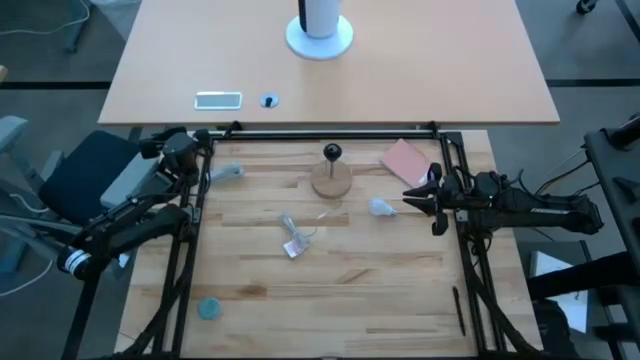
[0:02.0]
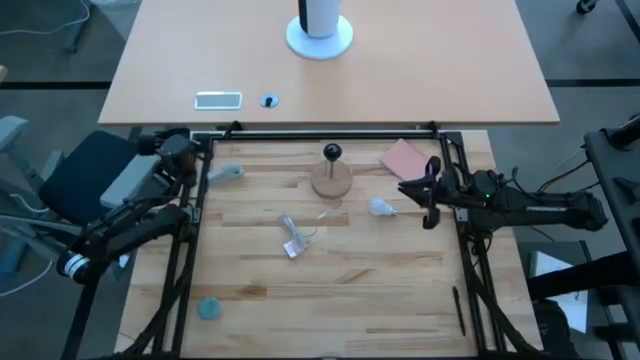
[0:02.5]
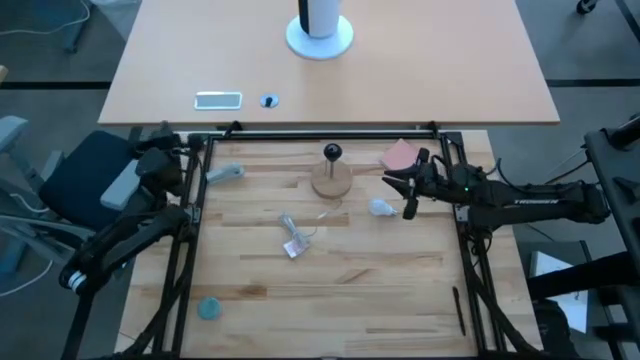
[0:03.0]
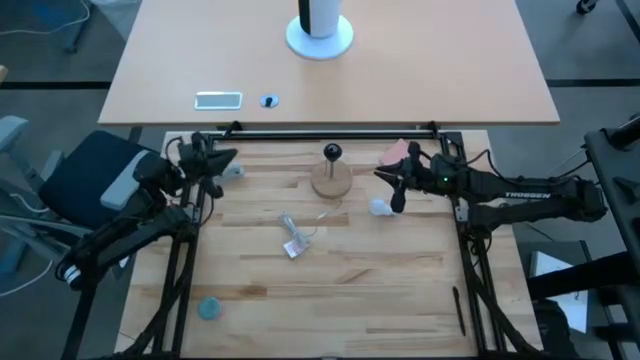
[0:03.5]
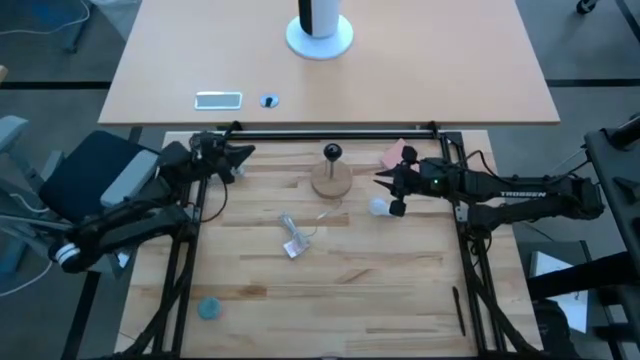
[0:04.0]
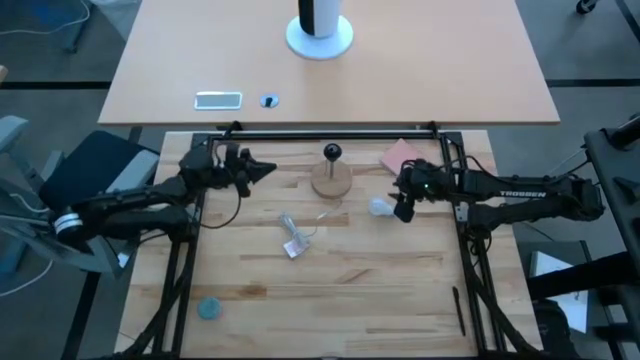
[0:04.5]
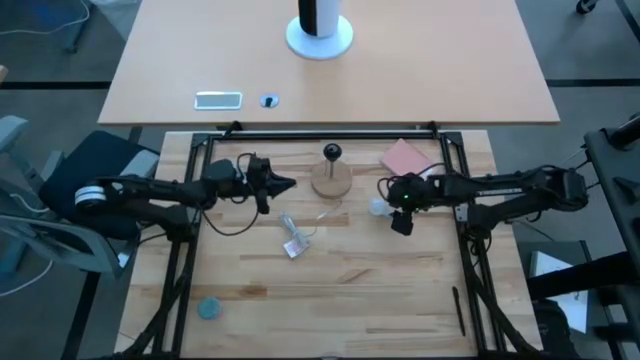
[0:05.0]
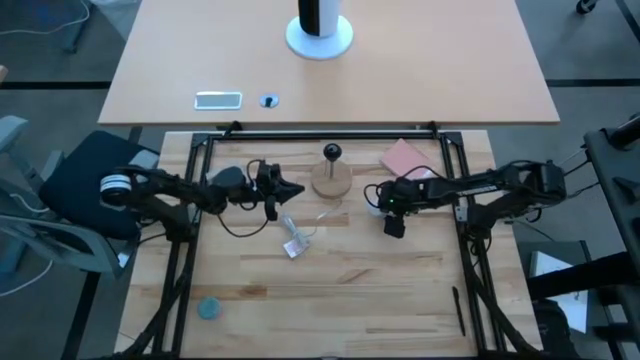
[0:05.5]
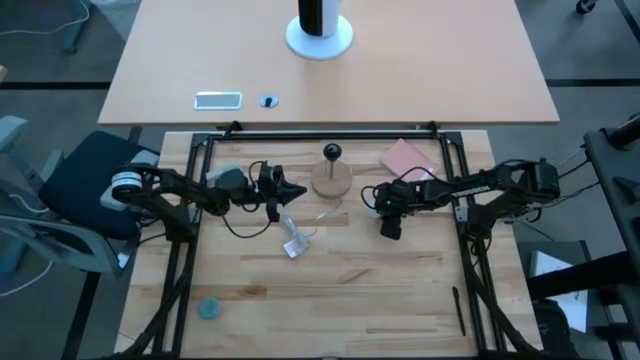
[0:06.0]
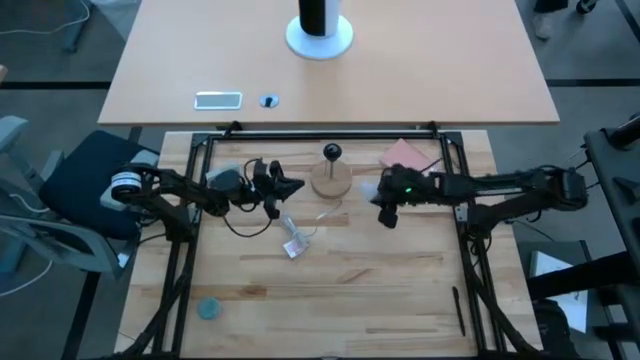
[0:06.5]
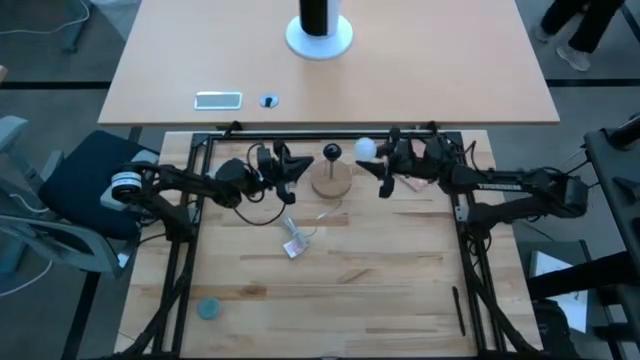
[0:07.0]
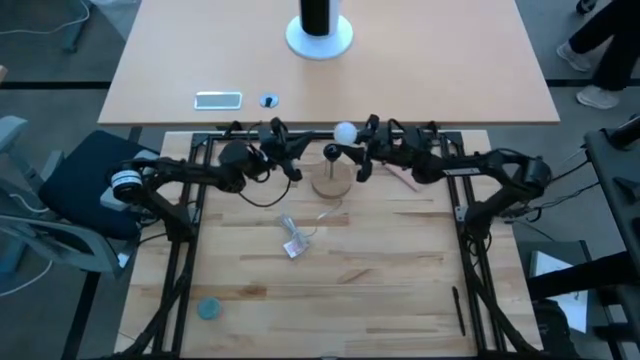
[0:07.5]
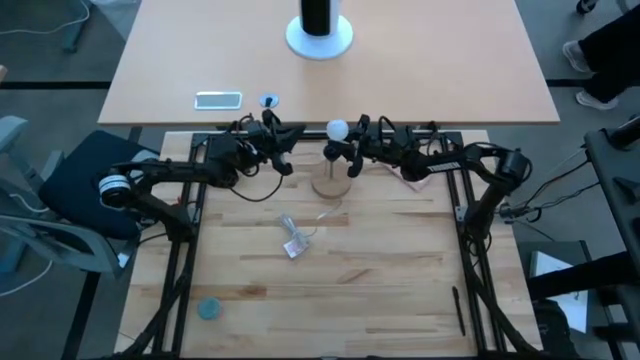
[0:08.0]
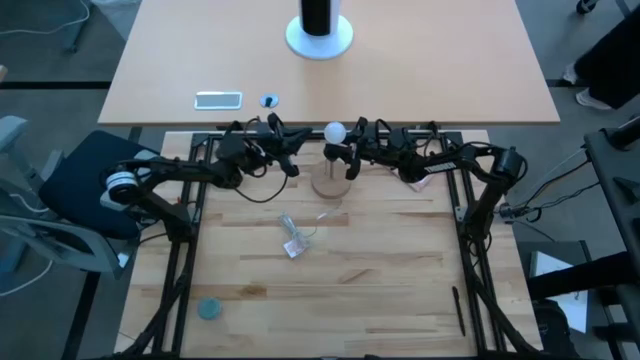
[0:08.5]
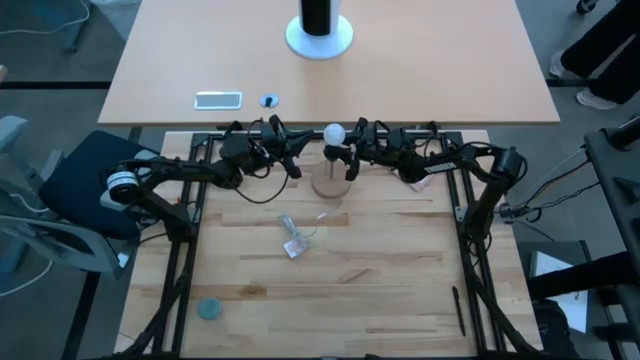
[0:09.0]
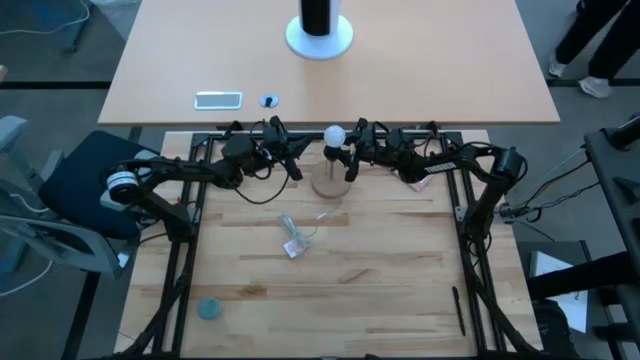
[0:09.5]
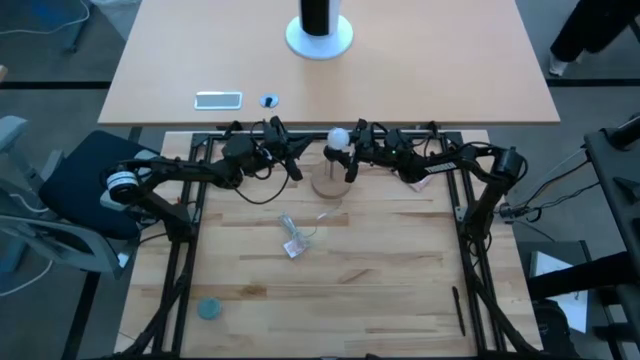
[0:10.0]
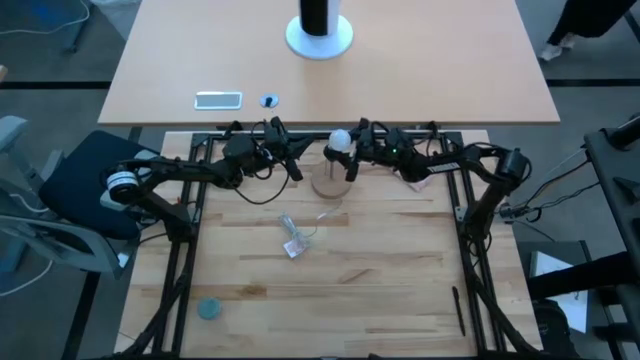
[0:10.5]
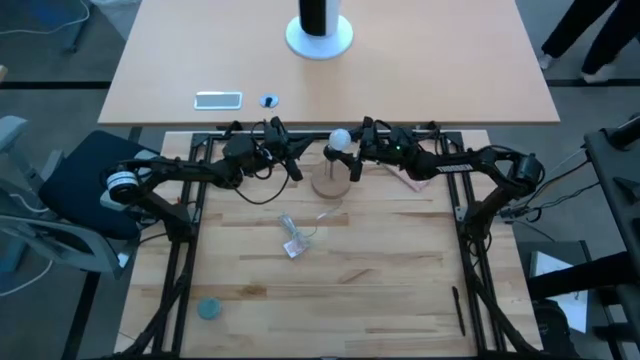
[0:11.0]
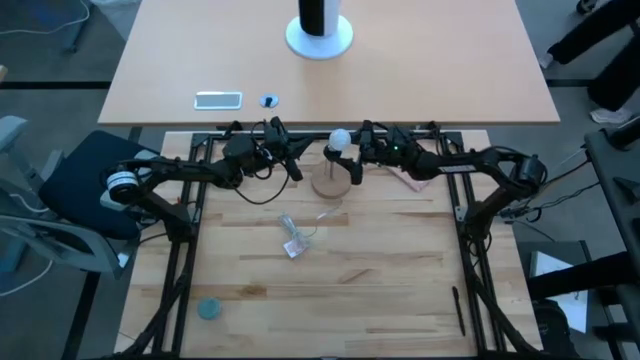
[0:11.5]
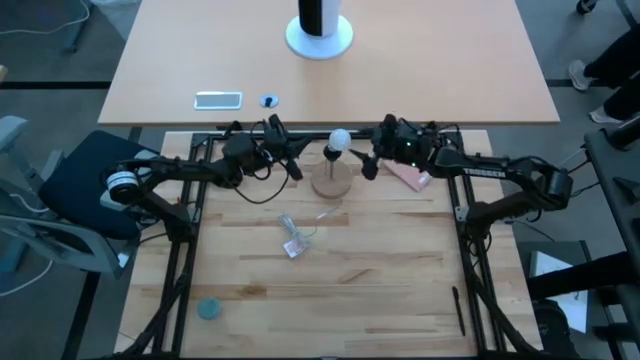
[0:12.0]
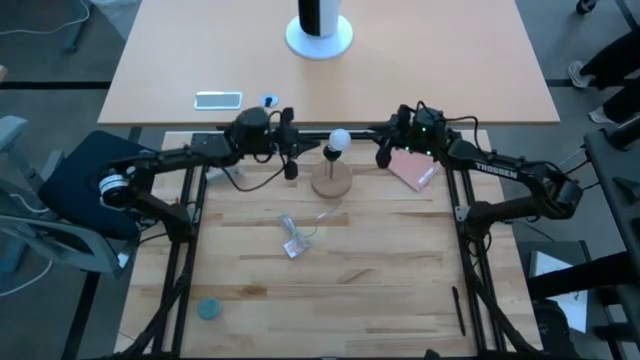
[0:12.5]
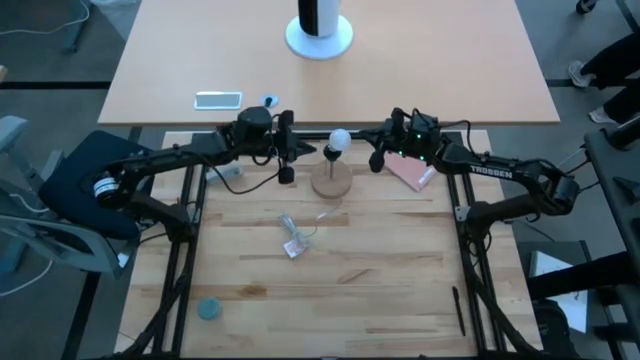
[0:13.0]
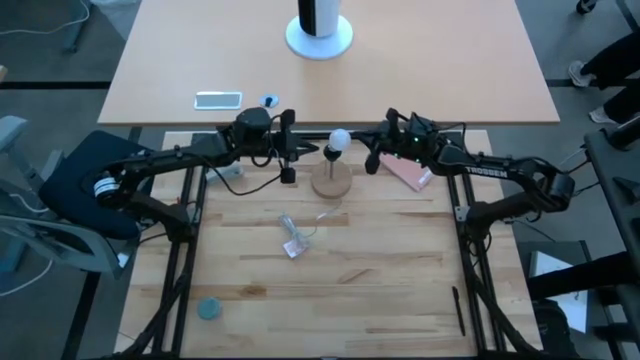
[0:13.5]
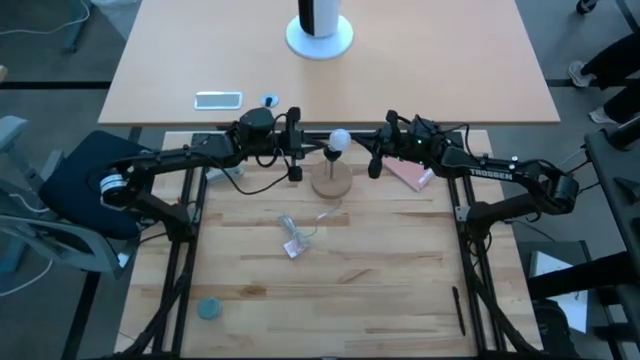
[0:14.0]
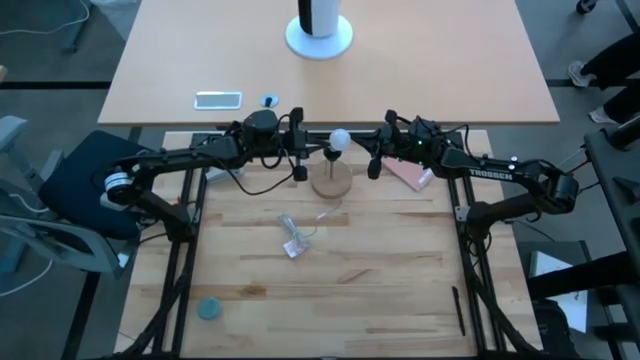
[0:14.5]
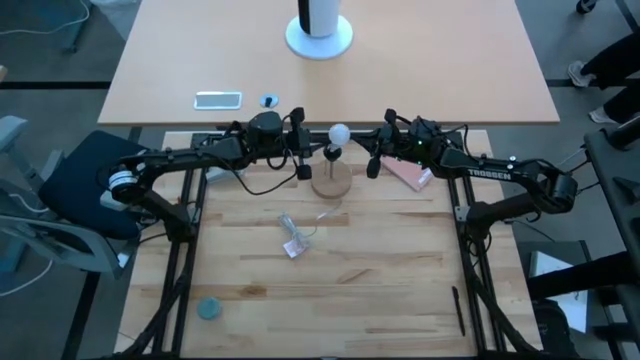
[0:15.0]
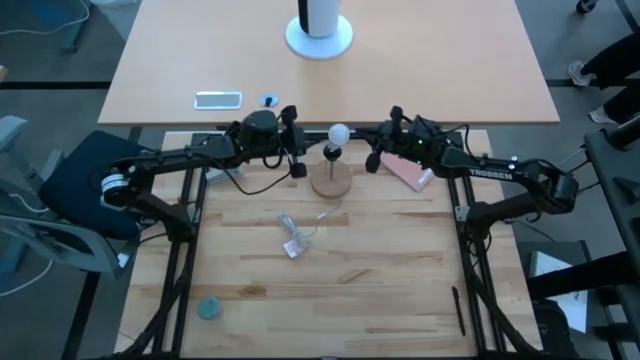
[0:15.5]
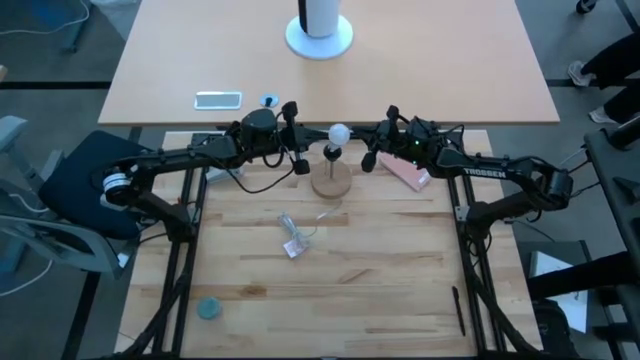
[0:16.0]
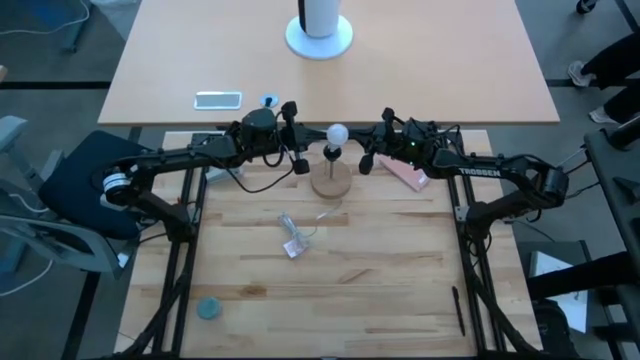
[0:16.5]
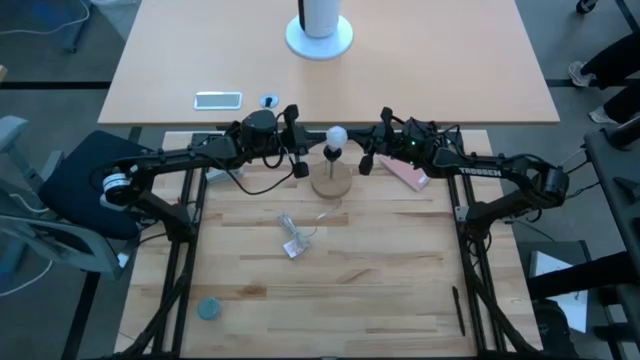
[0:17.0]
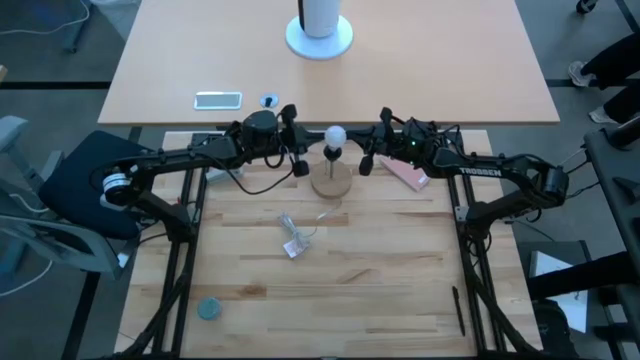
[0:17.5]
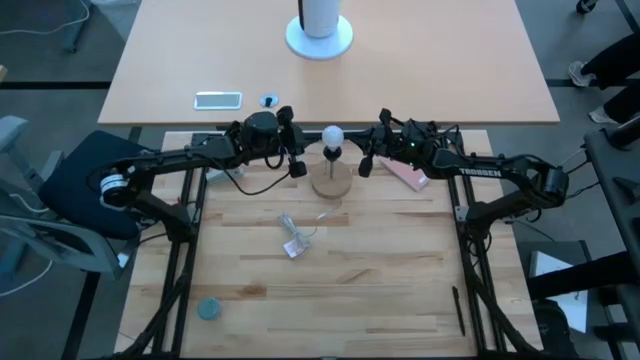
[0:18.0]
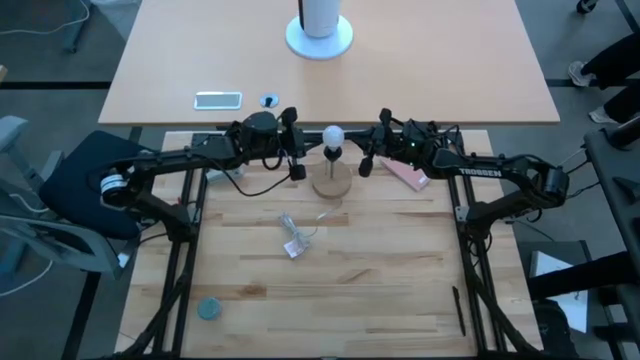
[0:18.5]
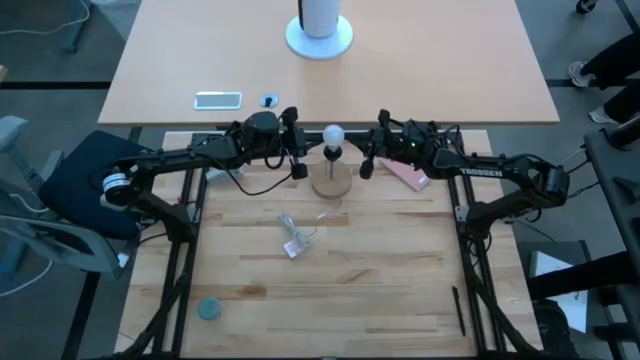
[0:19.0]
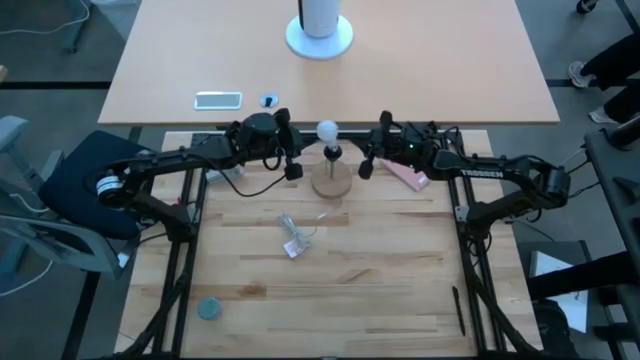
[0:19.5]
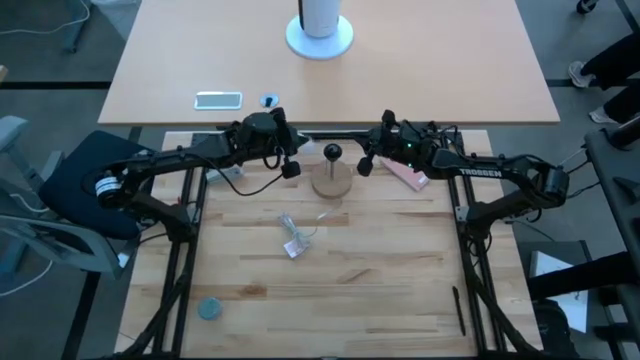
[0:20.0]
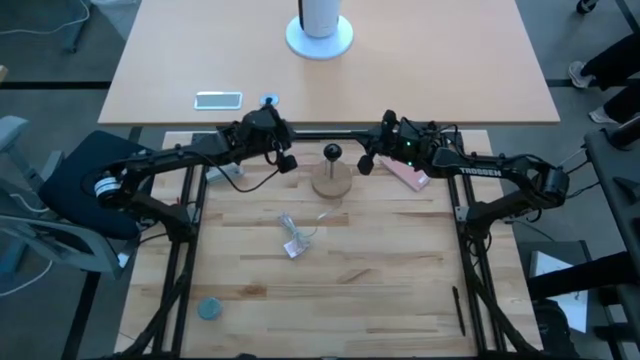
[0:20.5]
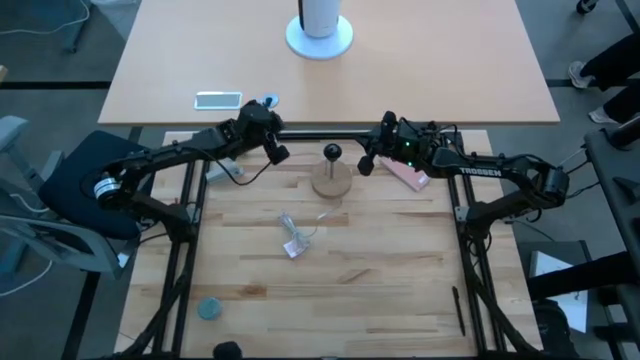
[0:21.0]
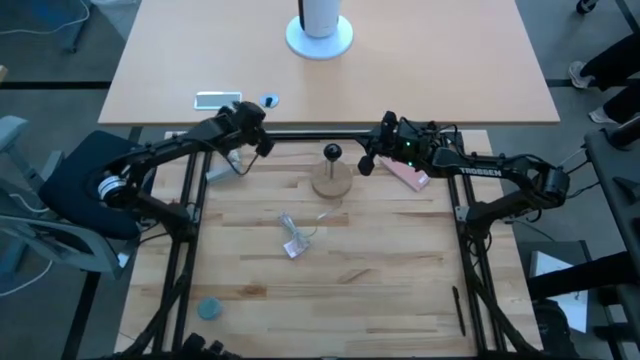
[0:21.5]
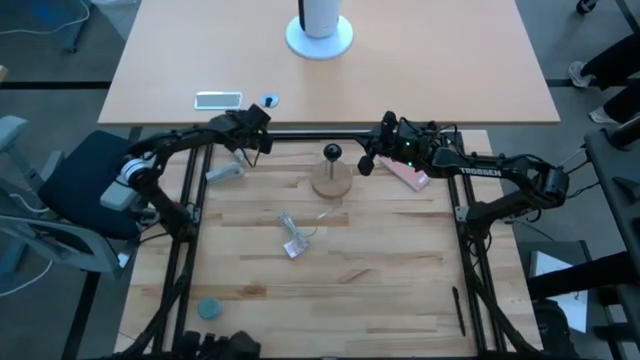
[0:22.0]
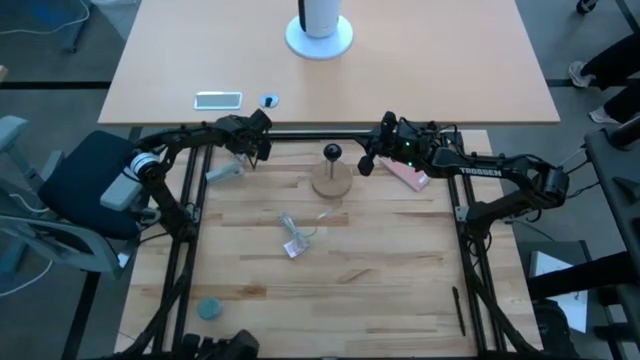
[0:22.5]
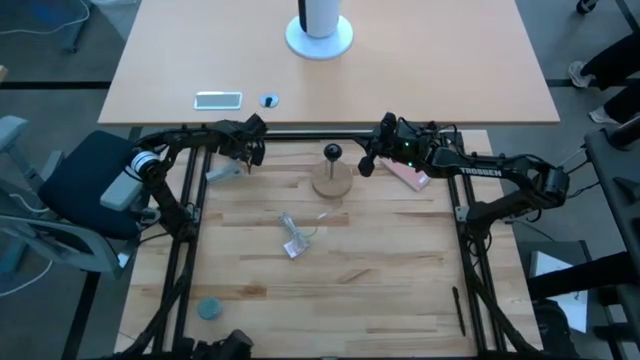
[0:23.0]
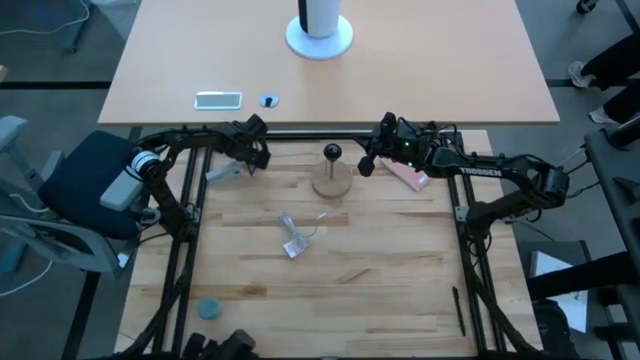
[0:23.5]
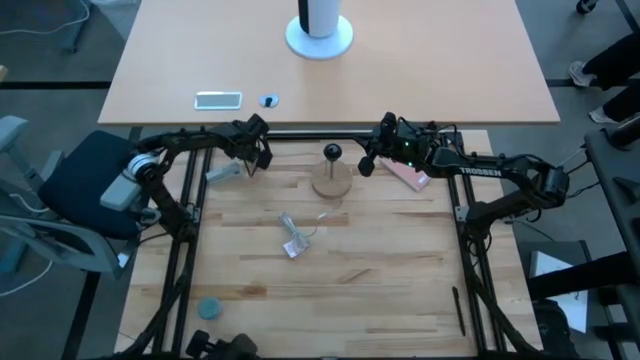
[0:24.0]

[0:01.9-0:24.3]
Task: Screw lightbulb
Insert the lightbulb on the desk lamp
